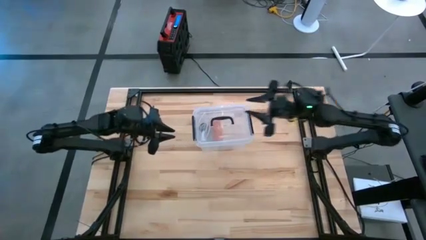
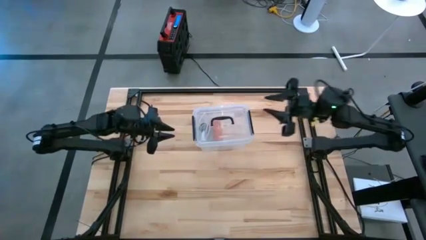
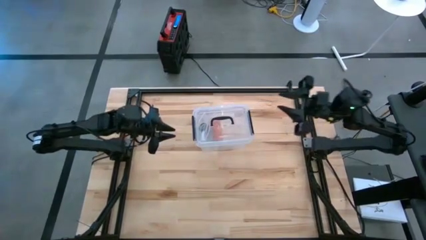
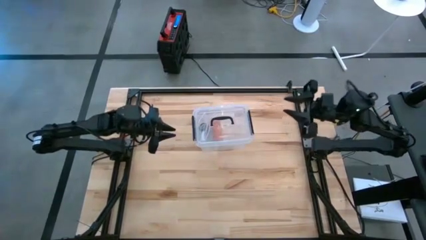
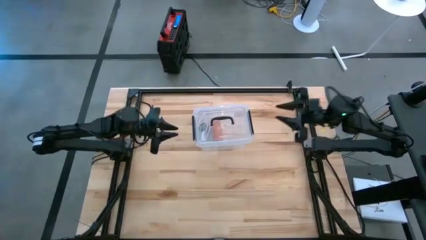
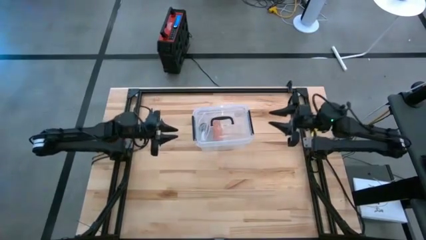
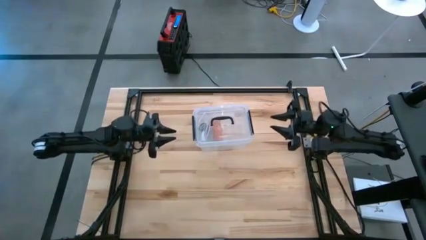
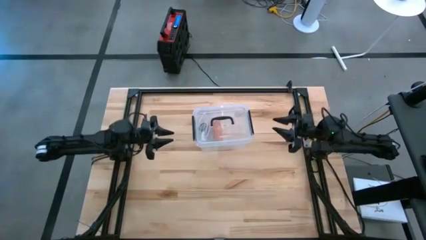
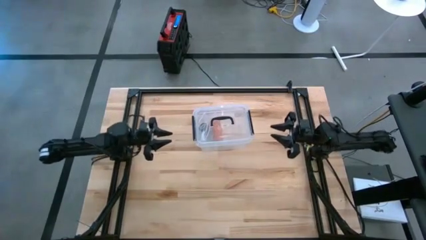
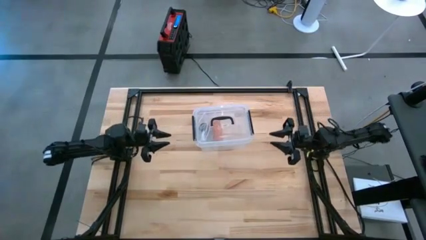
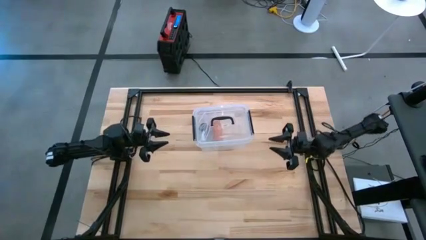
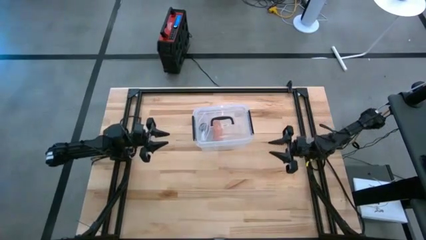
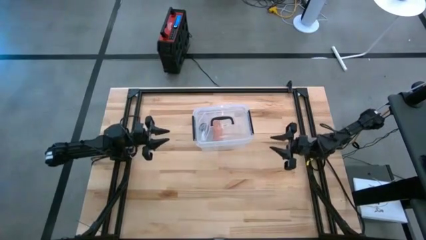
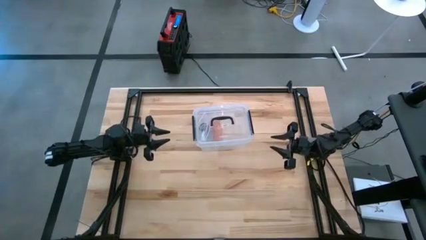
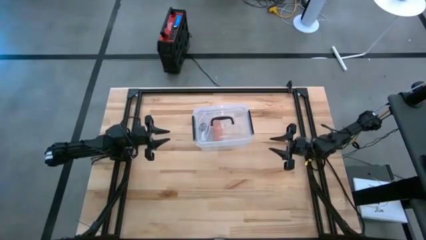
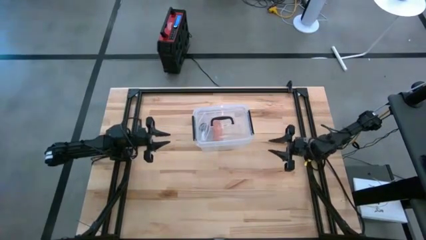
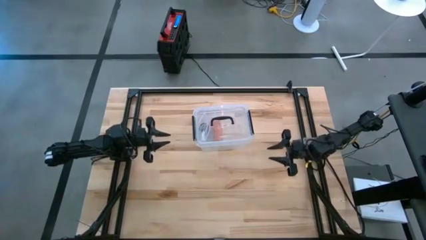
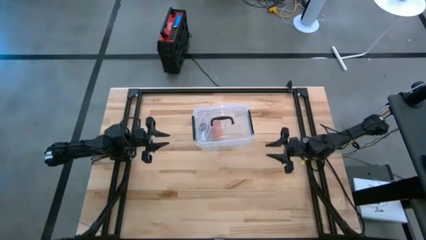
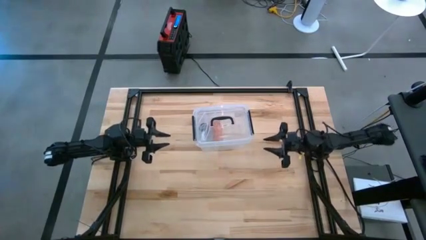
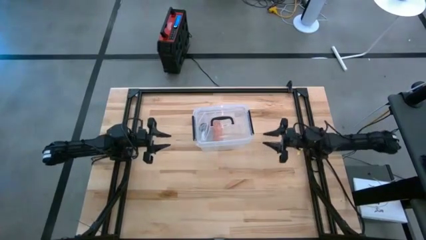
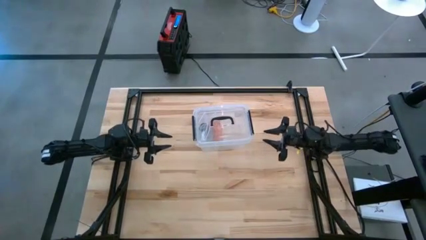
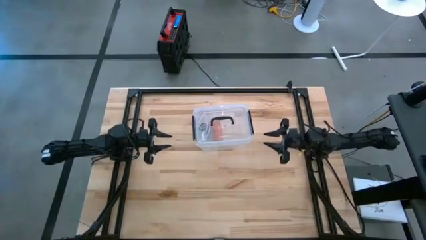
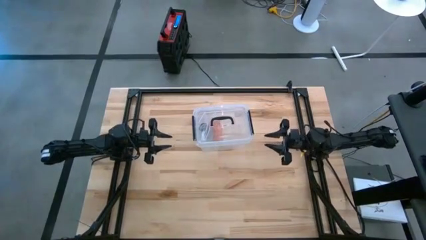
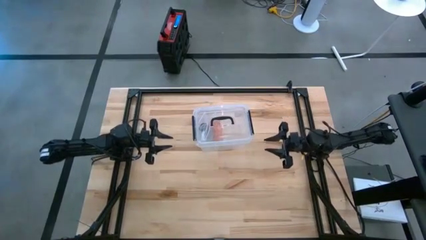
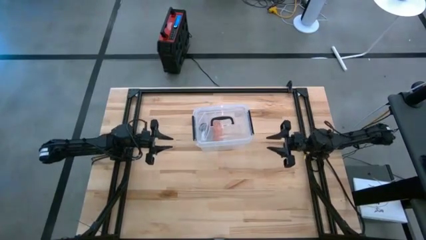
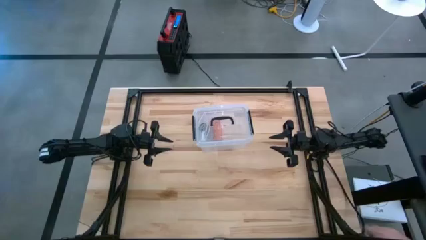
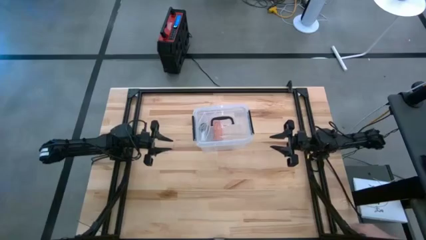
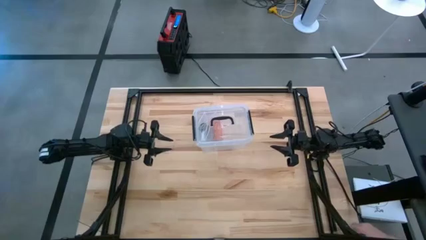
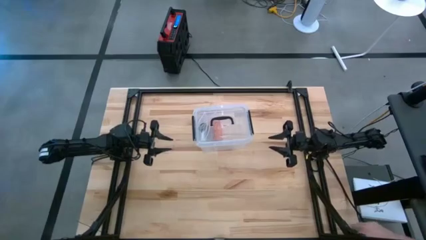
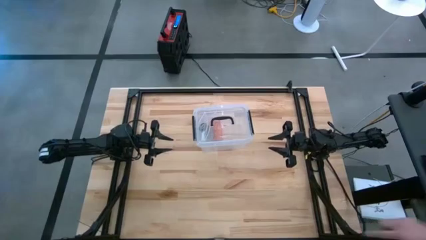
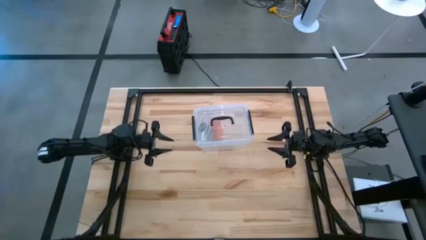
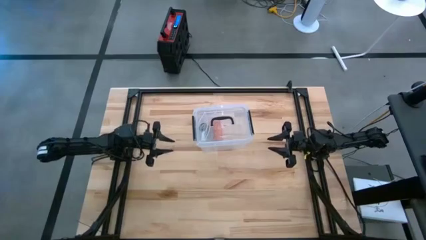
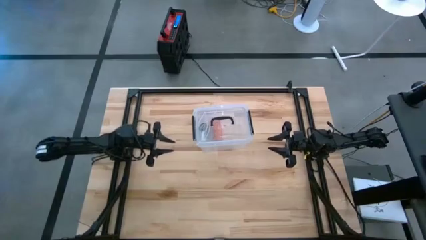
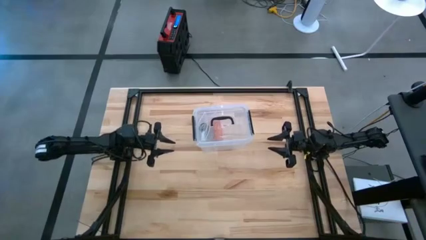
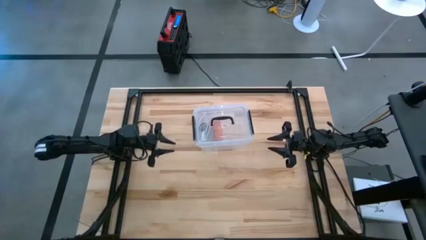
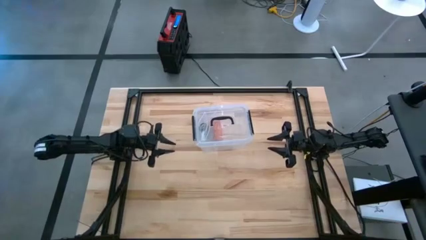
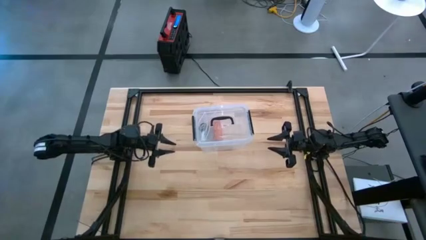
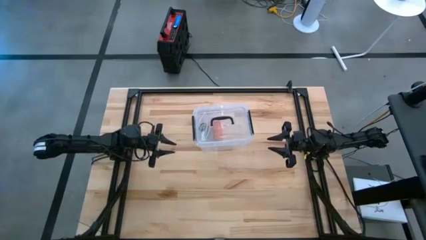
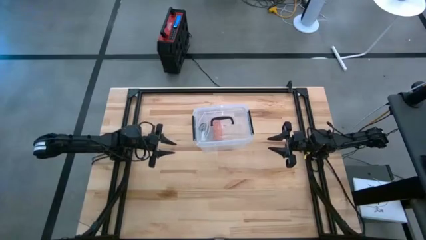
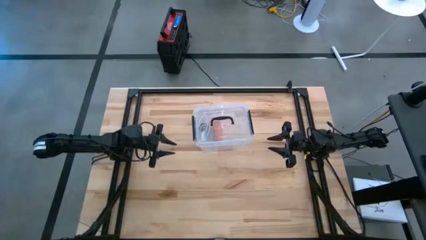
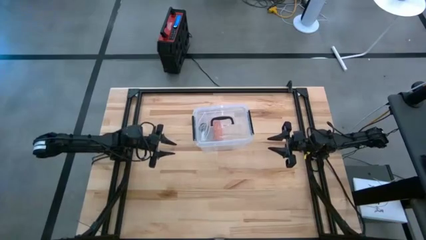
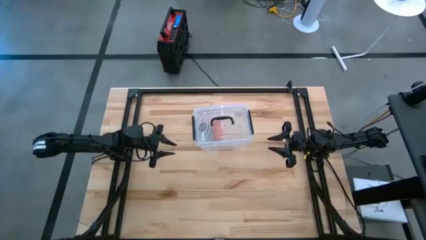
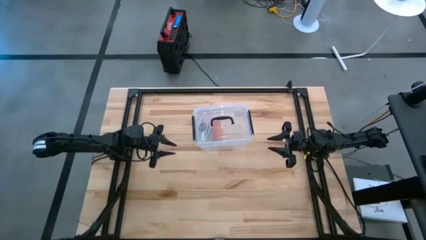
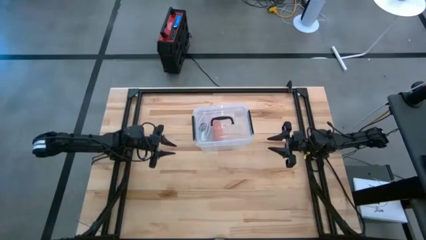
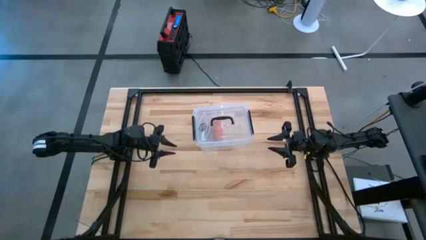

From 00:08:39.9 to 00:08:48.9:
Task: Roll bandage
Return to Home Position

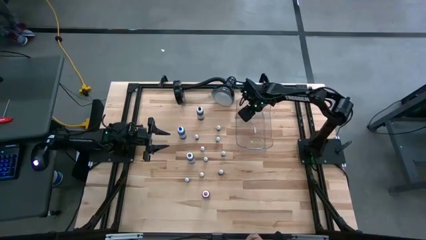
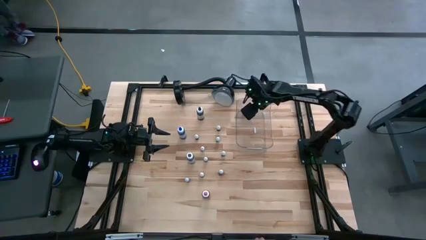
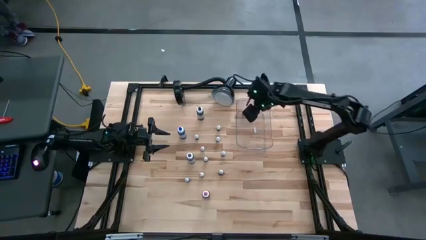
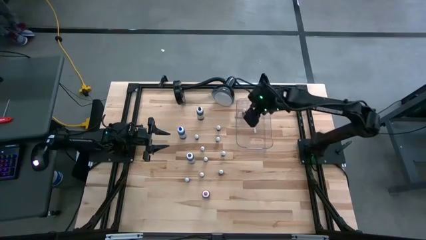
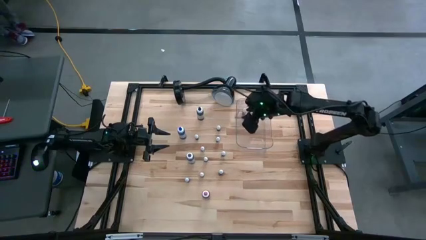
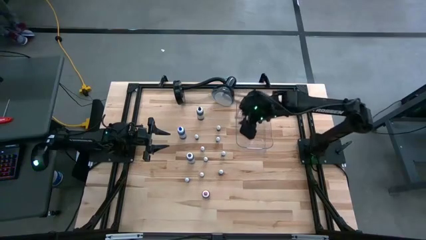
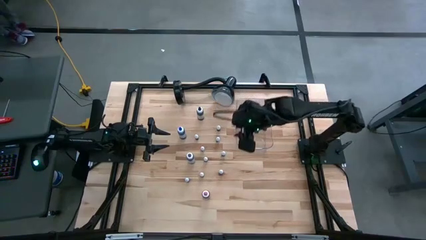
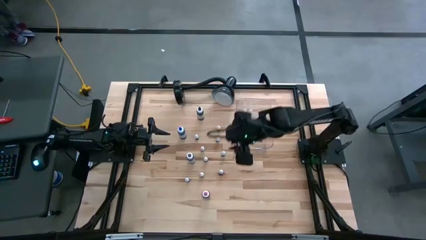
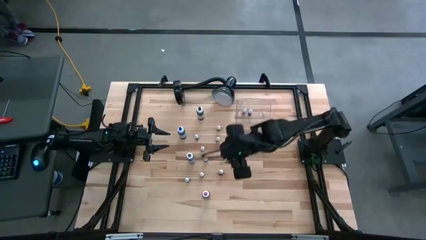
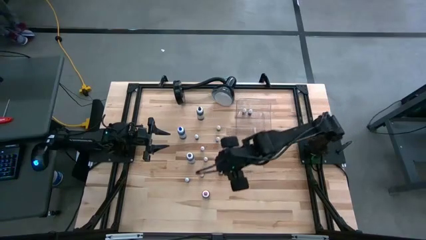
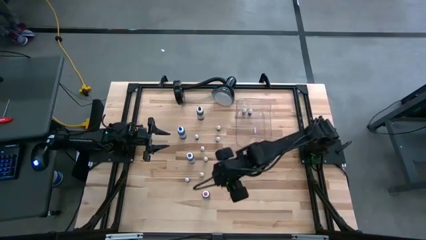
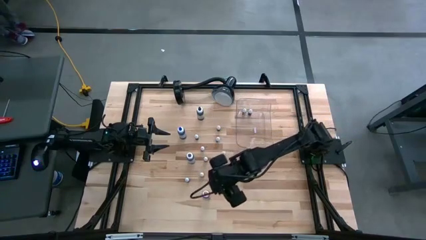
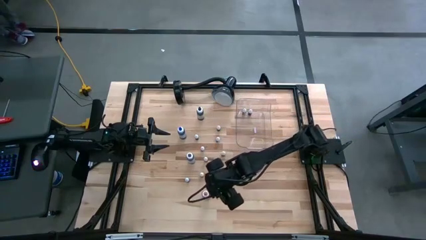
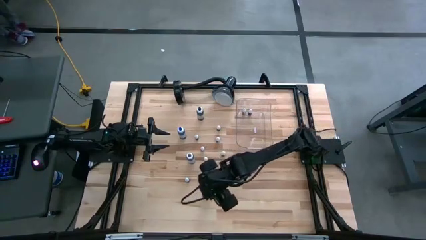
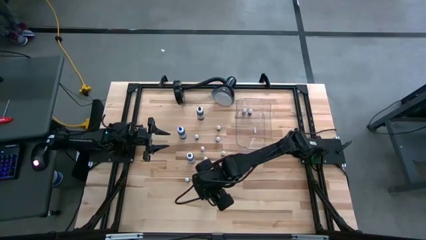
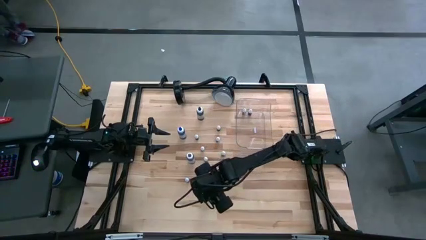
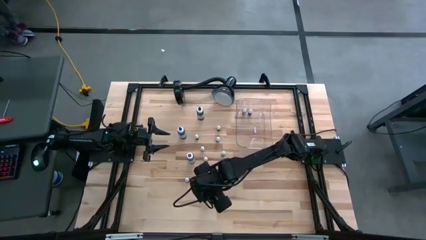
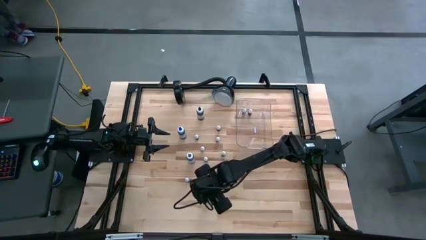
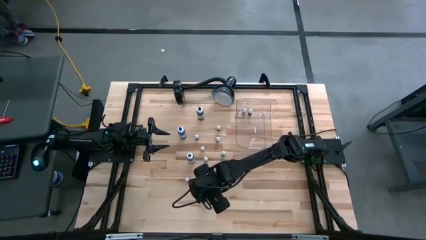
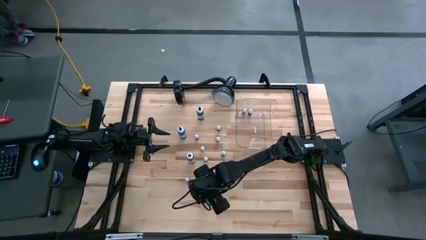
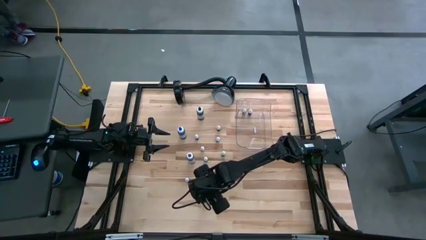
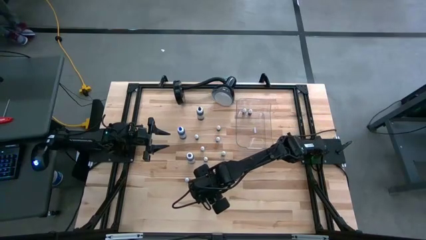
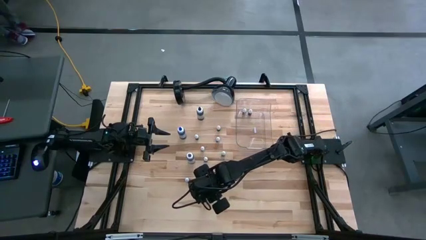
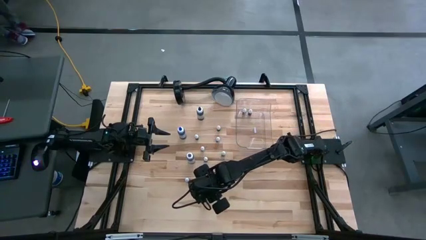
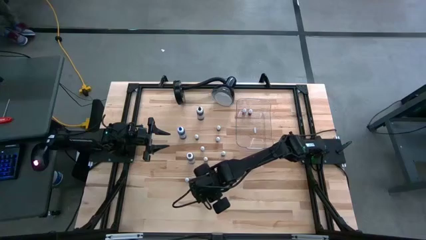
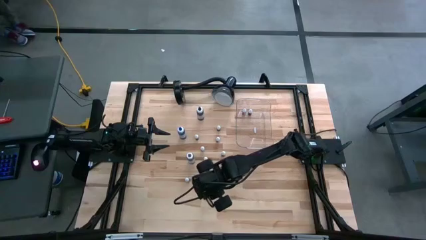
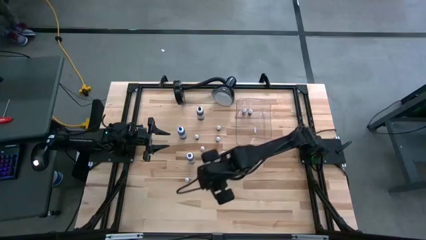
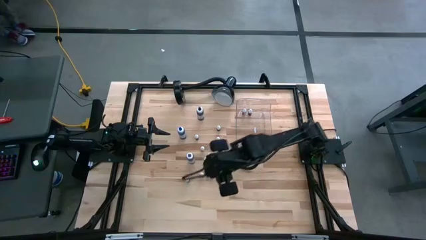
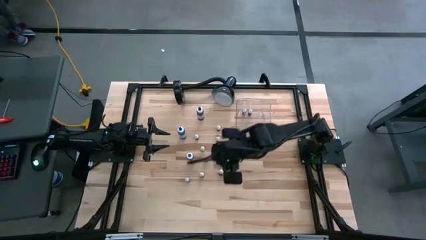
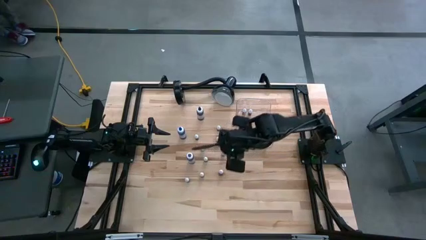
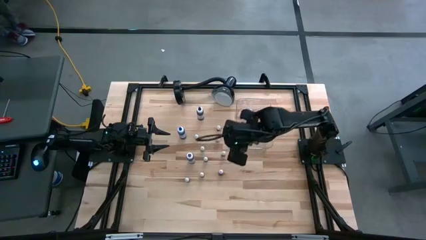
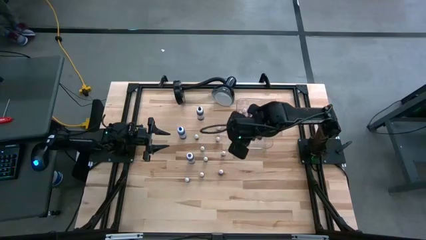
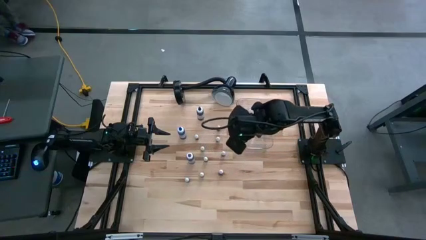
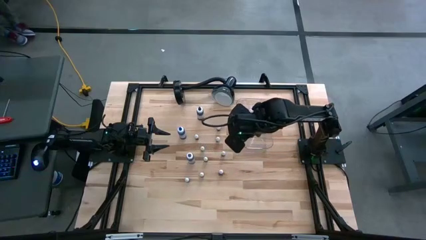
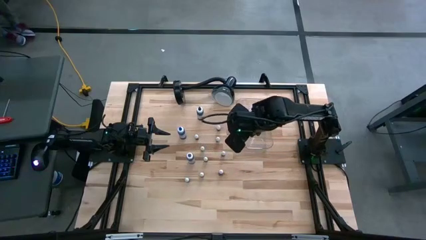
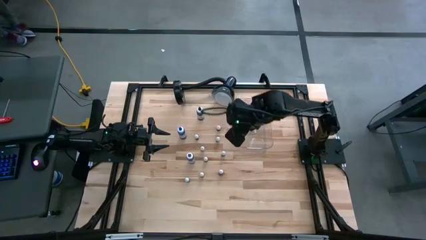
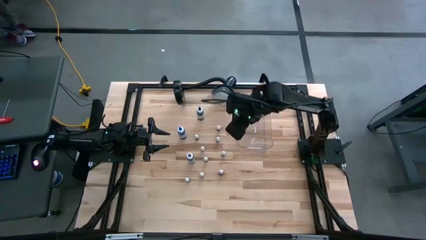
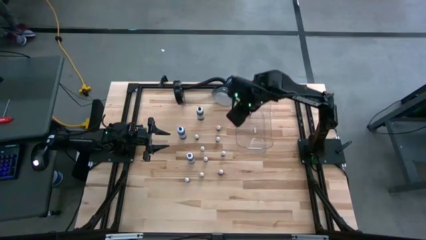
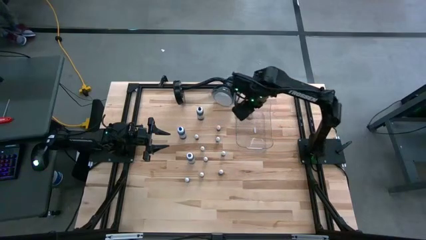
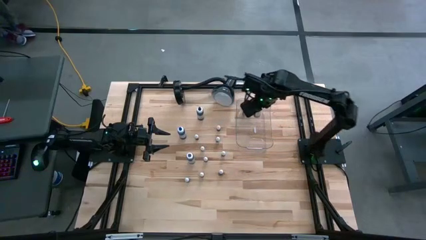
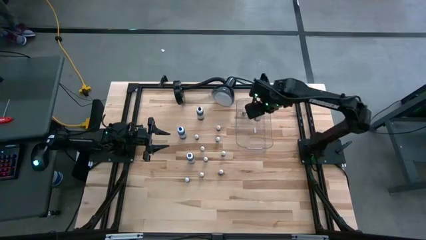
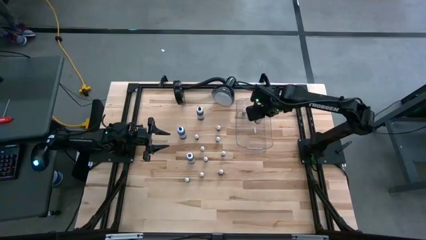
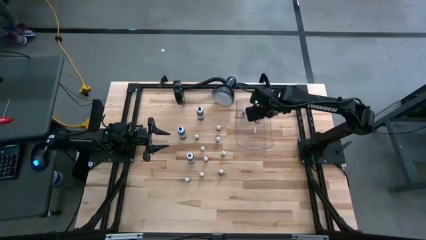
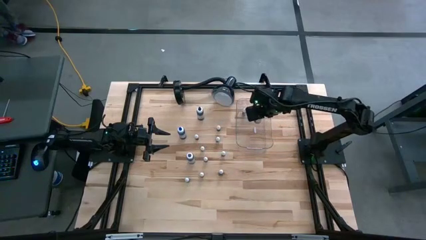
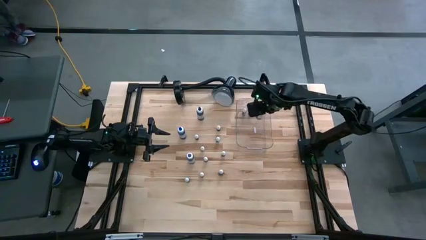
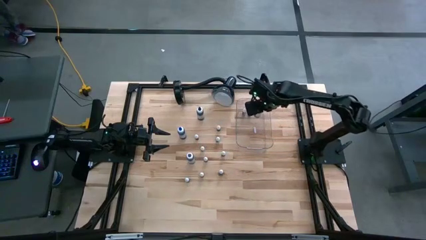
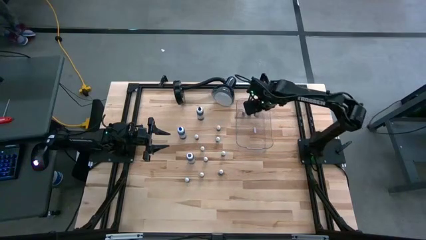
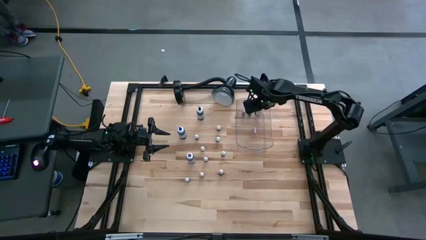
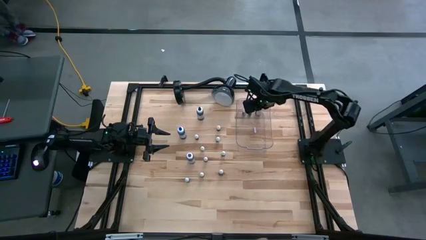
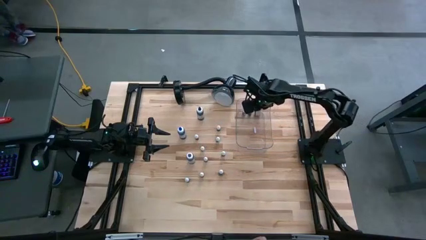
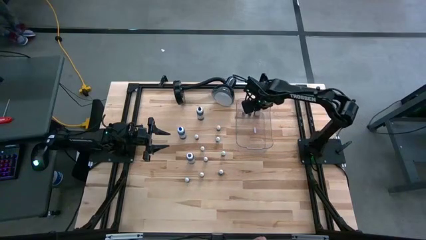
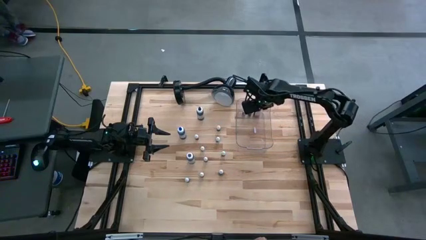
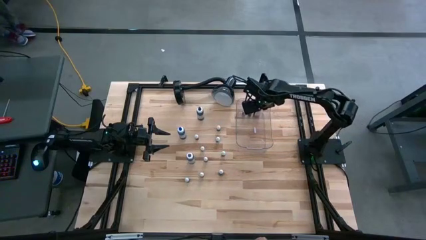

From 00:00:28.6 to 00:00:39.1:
Task: Pick & Place food coloring
Put the big pink food coloring bottle into the transparent bin
